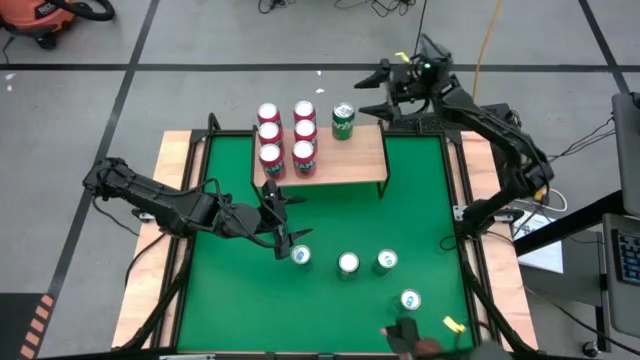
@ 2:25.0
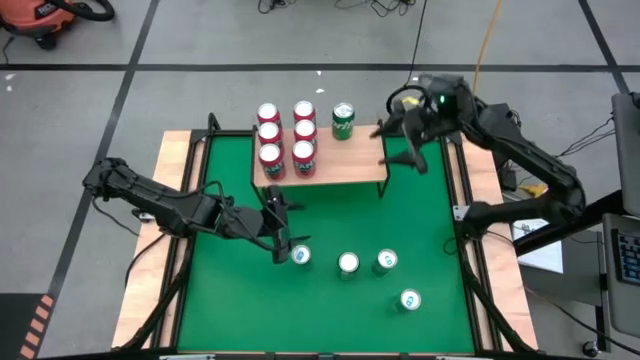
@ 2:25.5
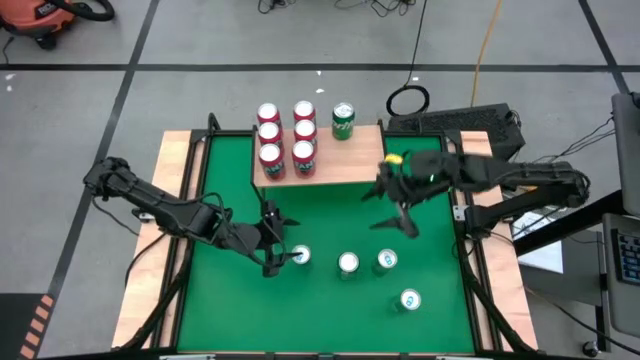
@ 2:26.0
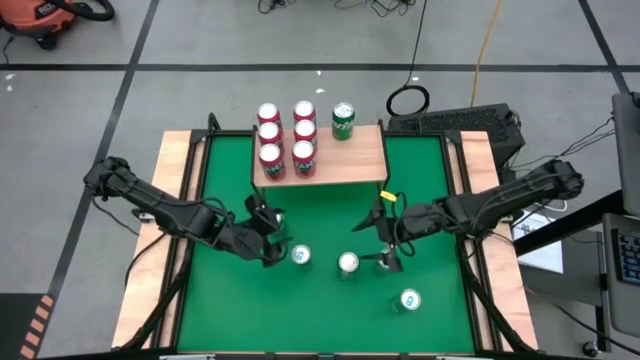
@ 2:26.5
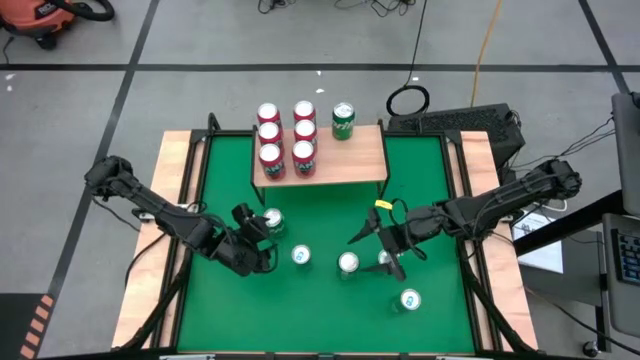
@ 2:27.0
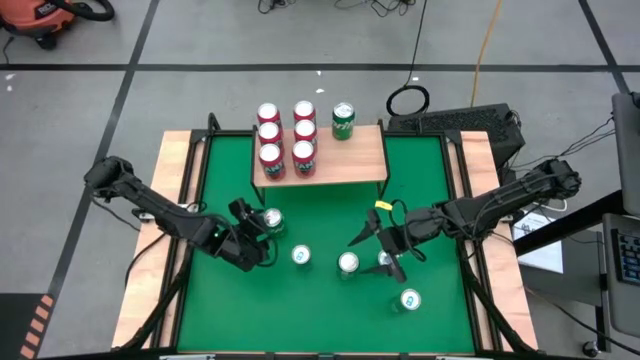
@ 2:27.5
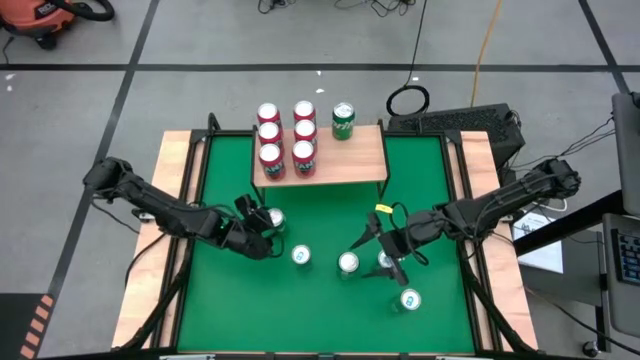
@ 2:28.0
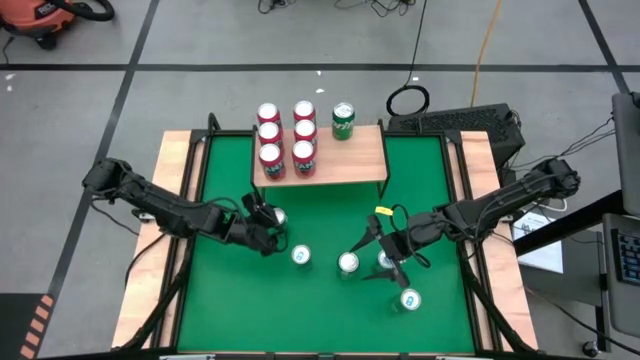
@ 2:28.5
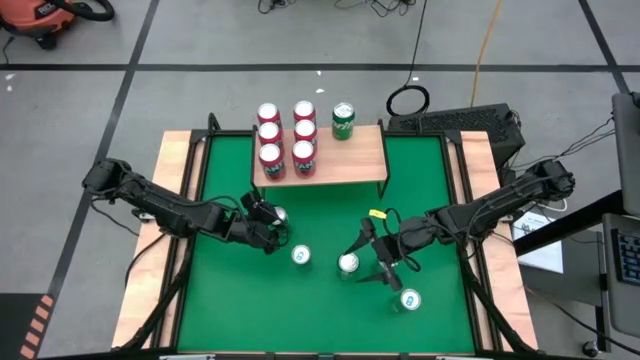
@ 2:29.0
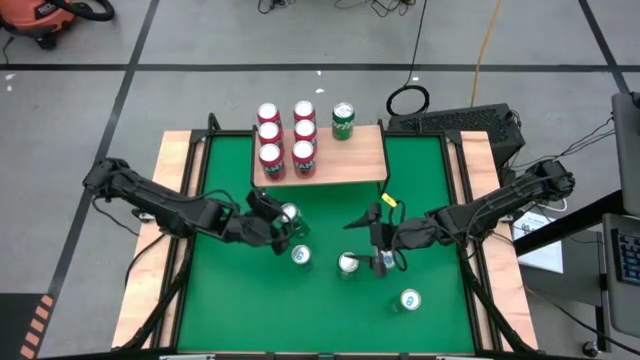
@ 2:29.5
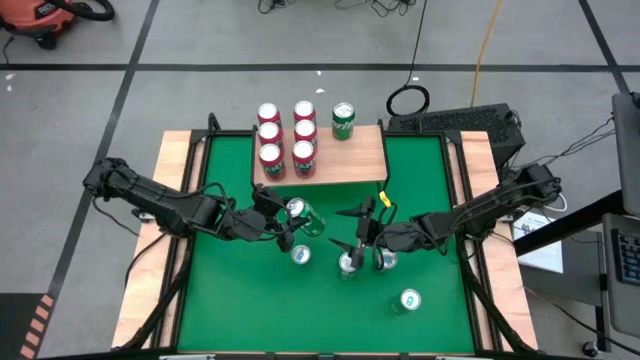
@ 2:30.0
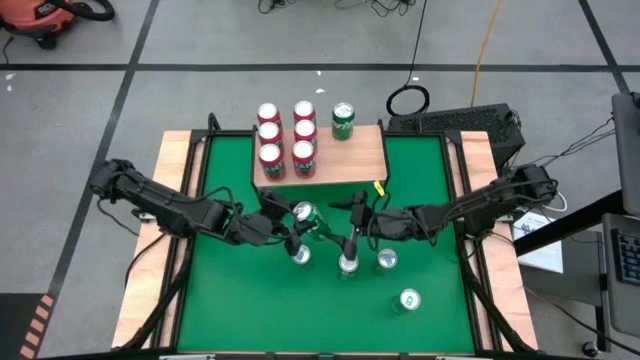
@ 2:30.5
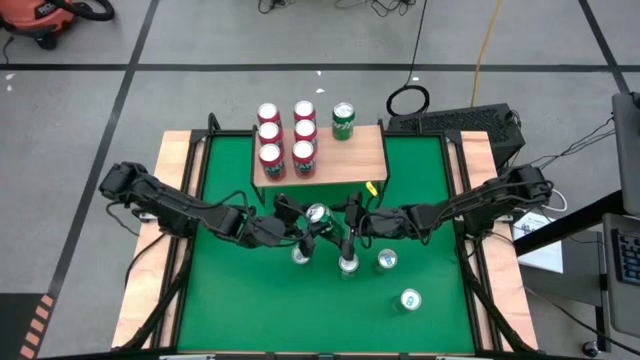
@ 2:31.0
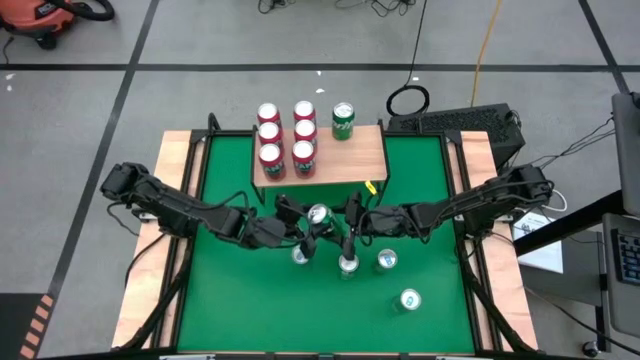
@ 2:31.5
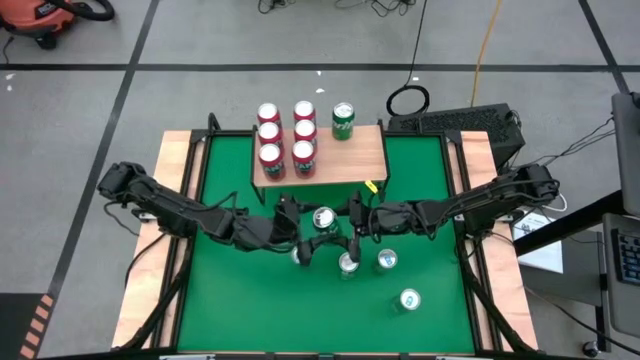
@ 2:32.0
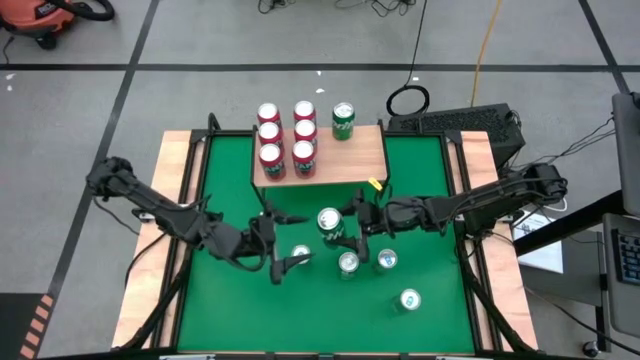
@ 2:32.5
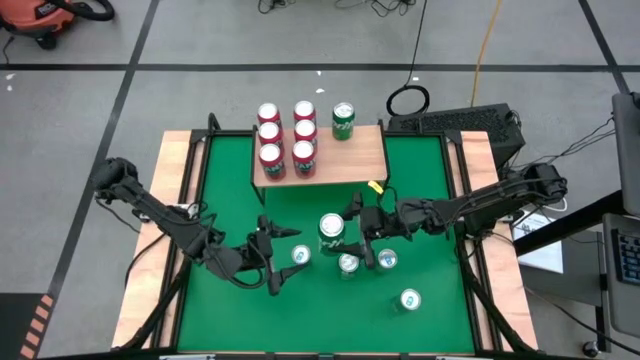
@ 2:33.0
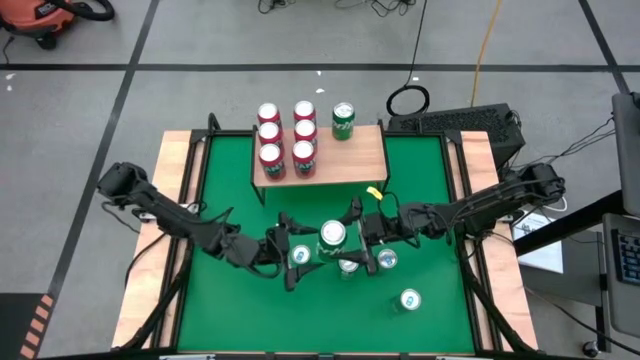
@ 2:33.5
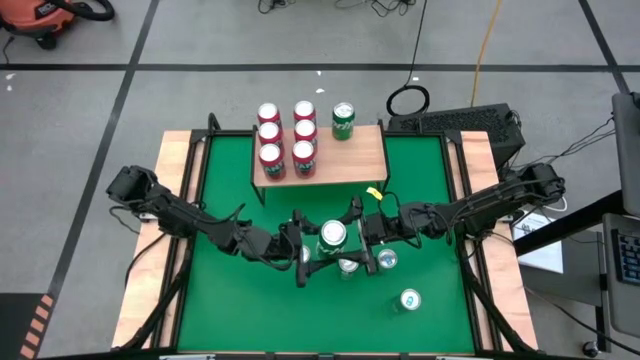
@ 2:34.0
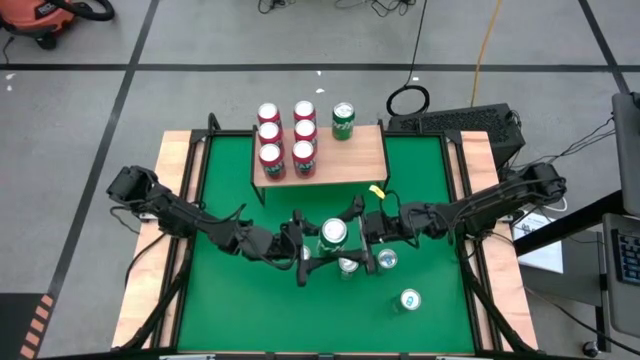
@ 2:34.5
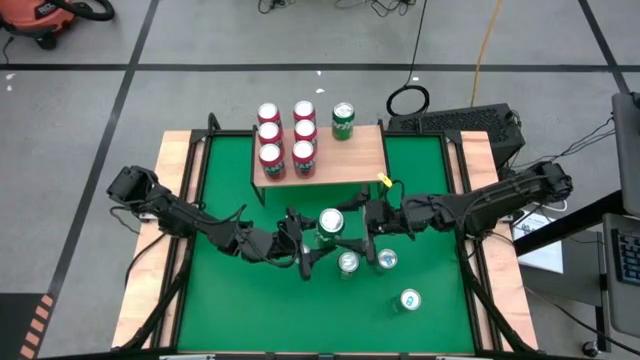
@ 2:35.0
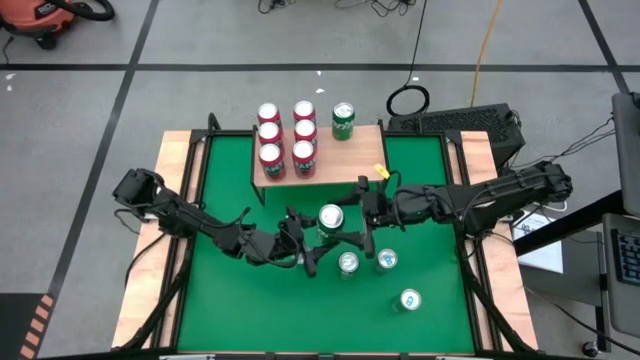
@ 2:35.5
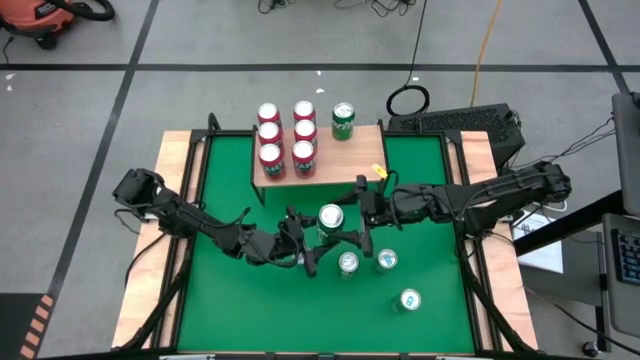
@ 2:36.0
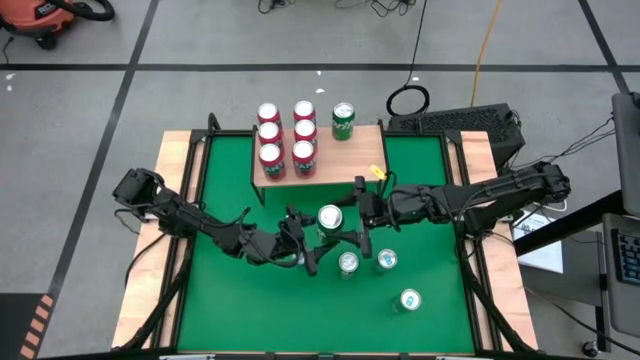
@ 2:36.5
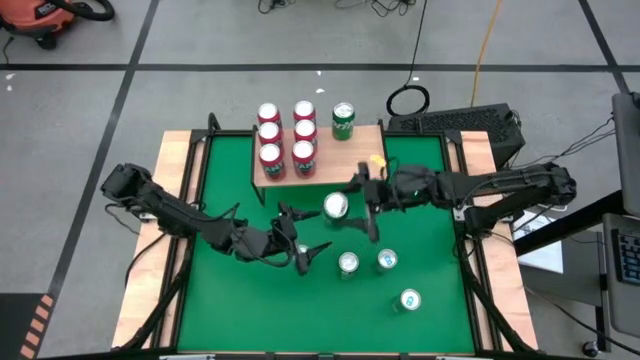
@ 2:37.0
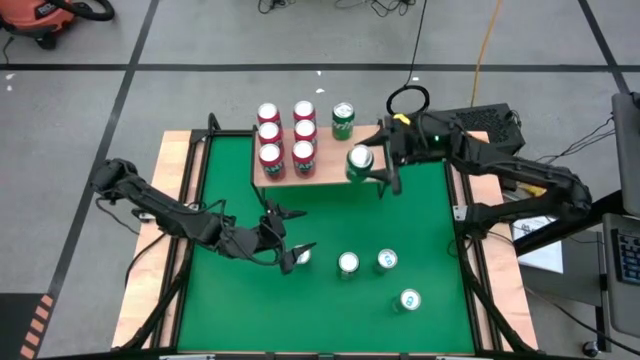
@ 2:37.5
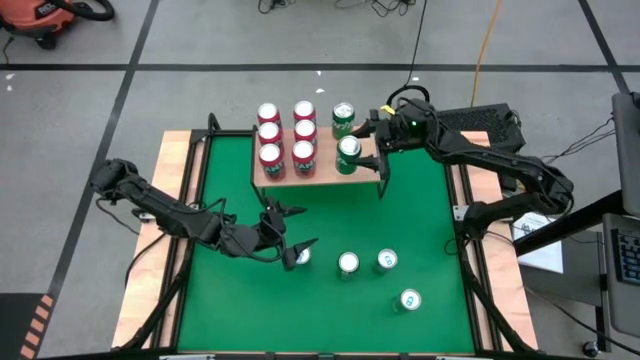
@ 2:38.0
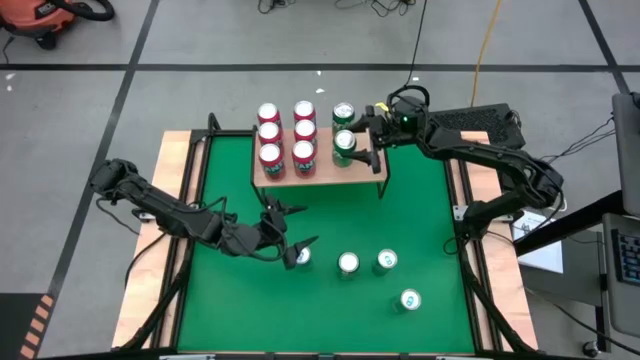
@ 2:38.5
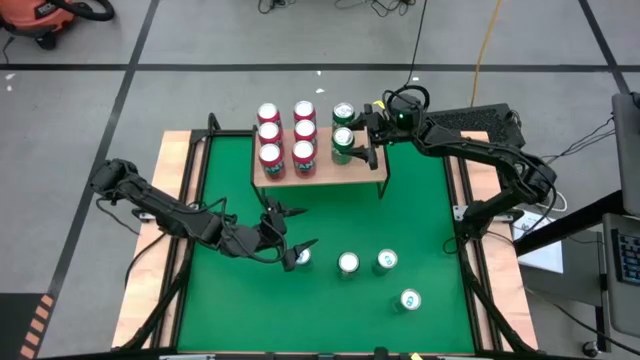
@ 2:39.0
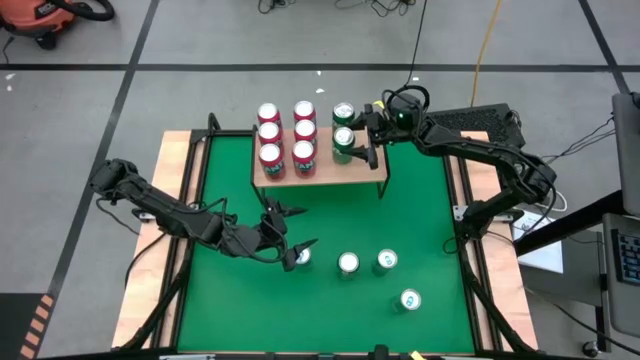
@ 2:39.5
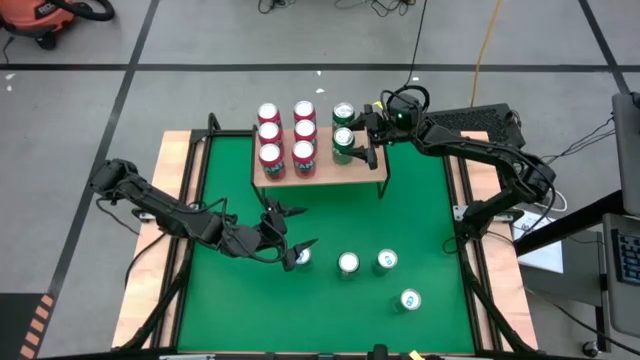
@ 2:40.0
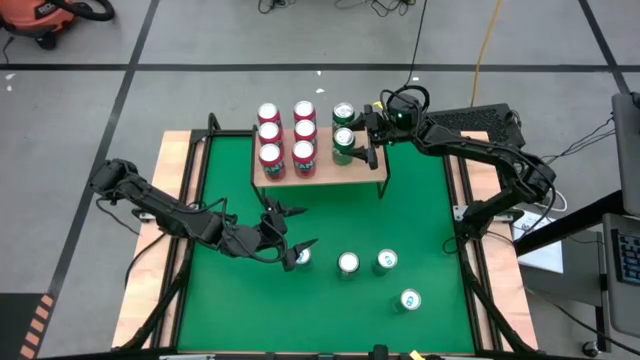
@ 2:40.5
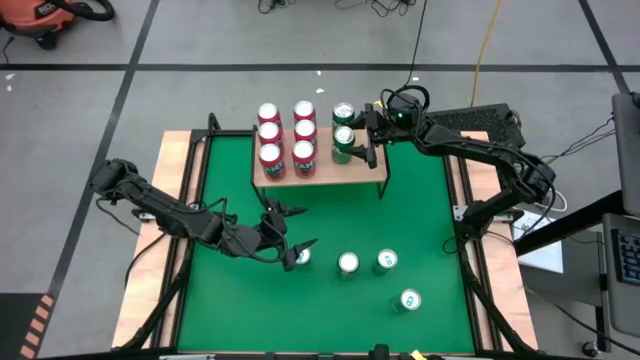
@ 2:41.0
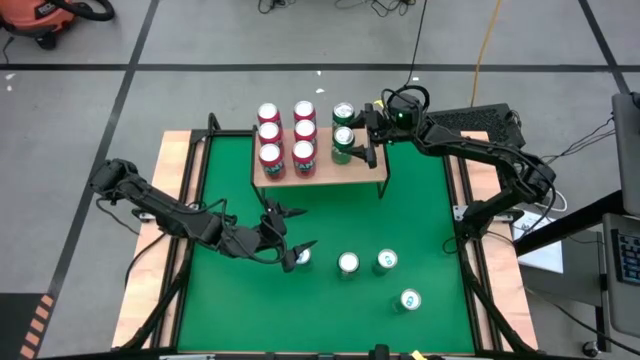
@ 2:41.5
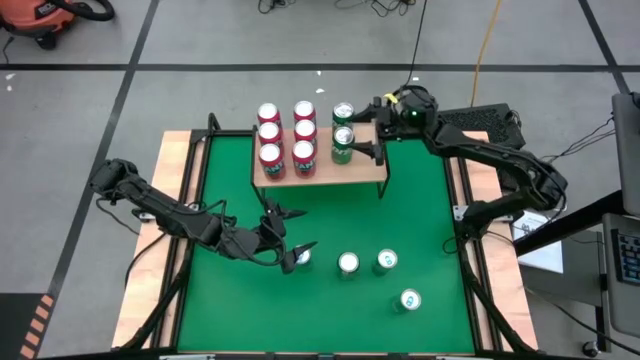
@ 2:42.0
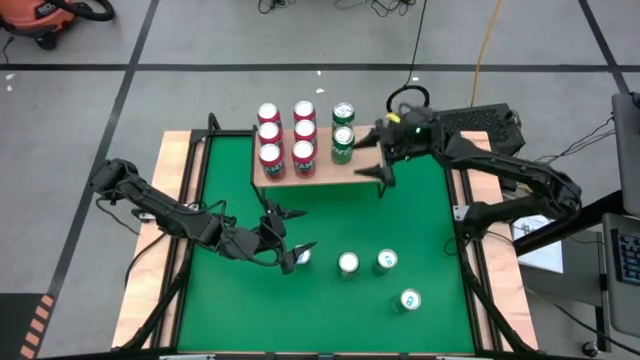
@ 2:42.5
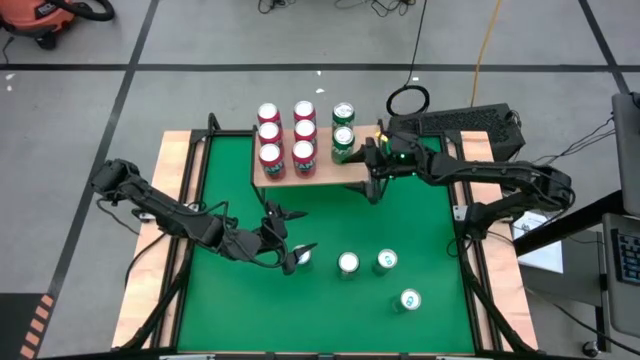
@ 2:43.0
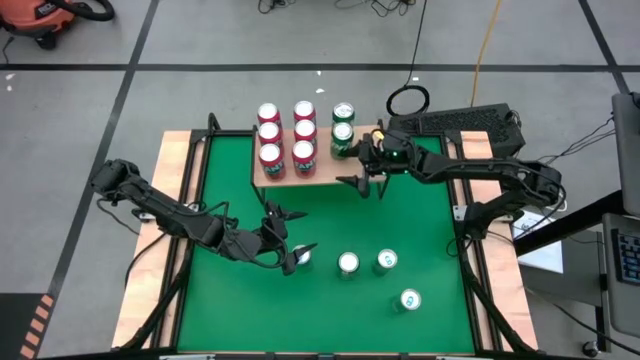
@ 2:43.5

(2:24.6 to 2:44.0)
Task: Place canned beverage on shelf
Put the green soda can on the shelf aligned with the other green soda can

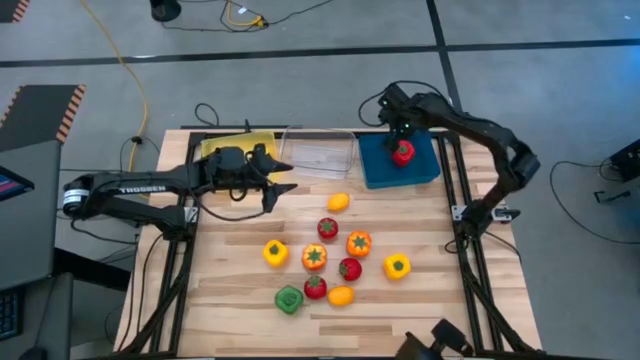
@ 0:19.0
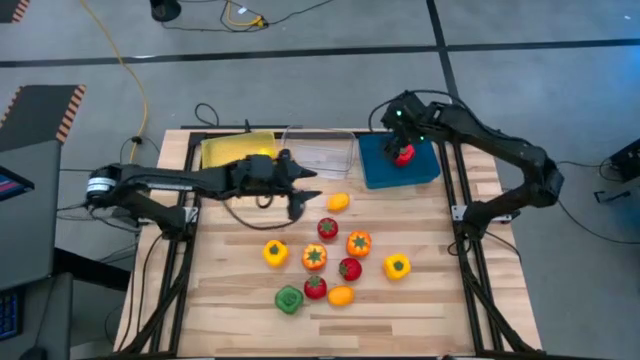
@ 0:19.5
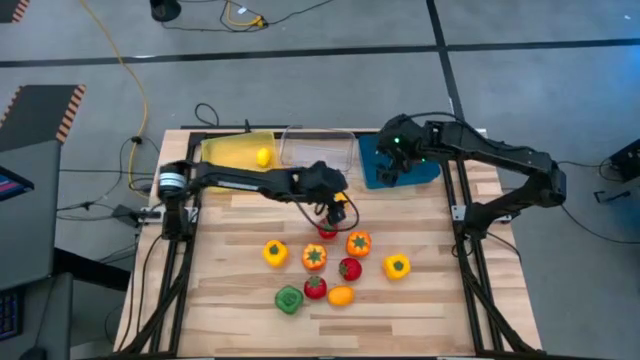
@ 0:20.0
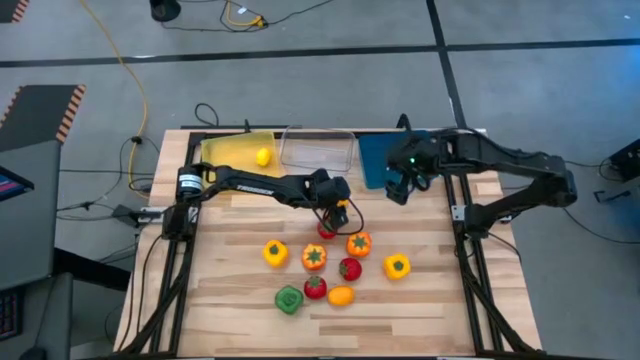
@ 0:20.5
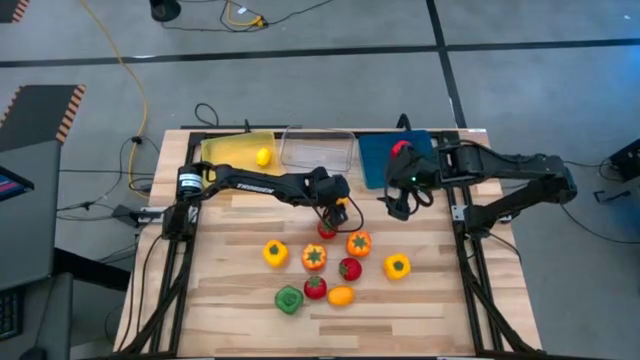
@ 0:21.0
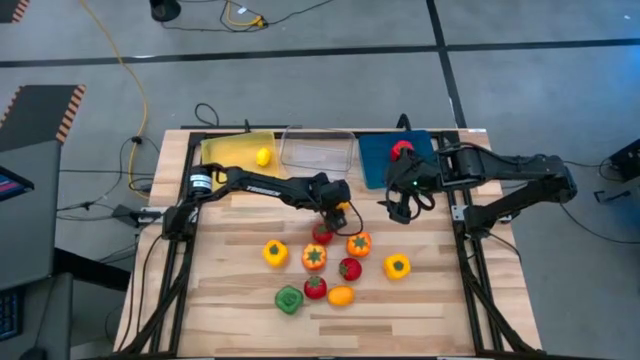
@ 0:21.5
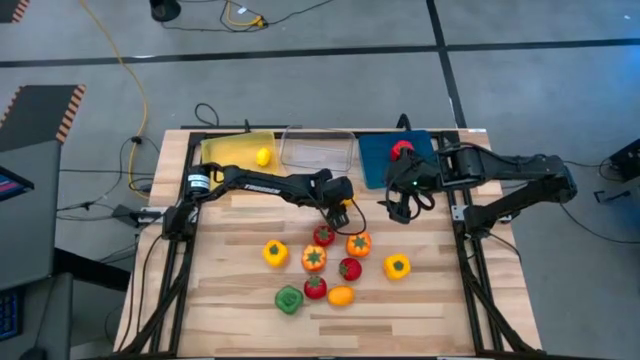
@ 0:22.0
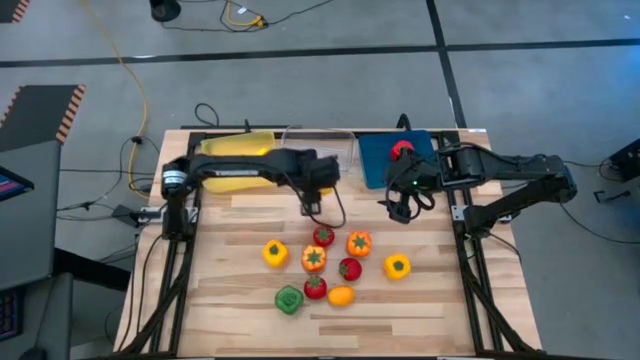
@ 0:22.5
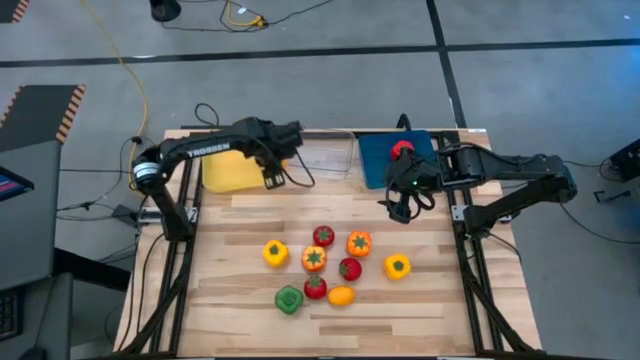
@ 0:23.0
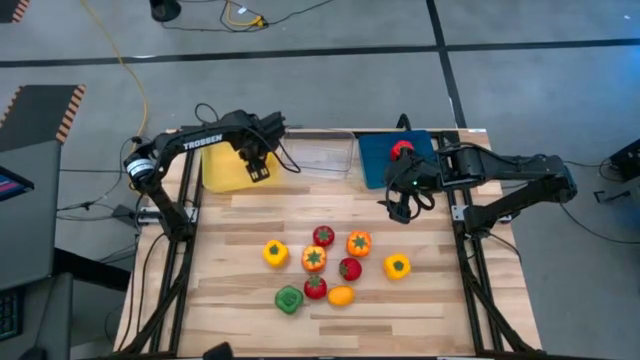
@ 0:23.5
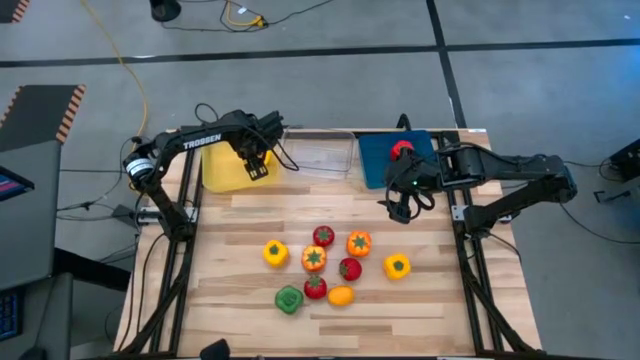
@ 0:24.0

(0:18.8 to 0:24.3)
Task: Sort produce into baskets
Put the top yellow lemon into the yellow bin
